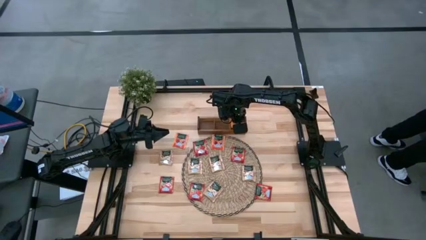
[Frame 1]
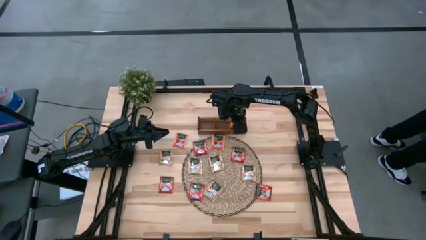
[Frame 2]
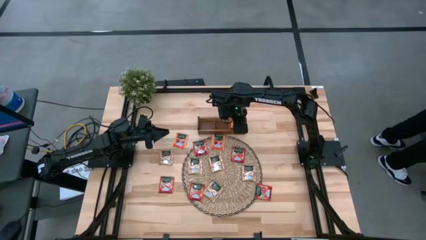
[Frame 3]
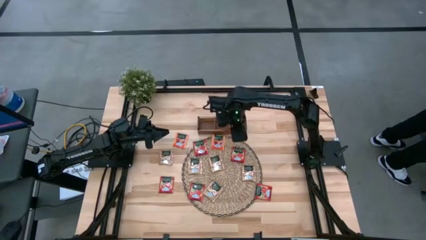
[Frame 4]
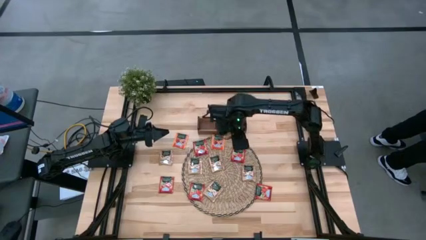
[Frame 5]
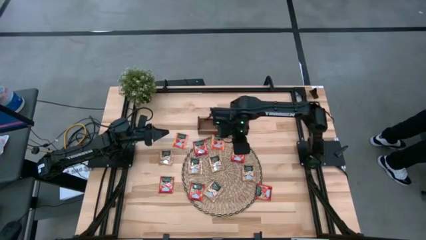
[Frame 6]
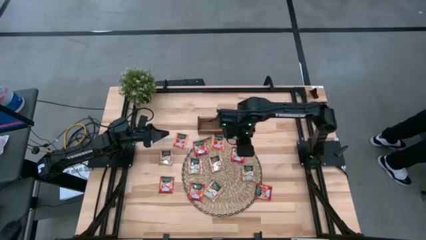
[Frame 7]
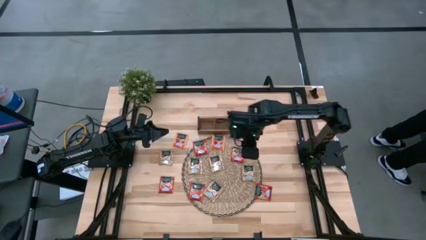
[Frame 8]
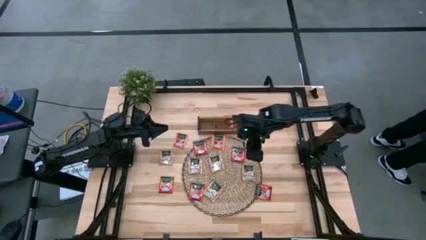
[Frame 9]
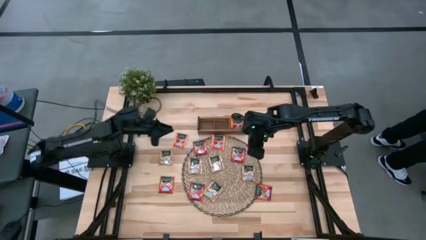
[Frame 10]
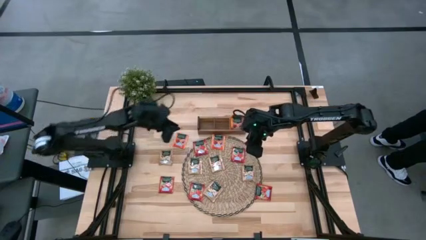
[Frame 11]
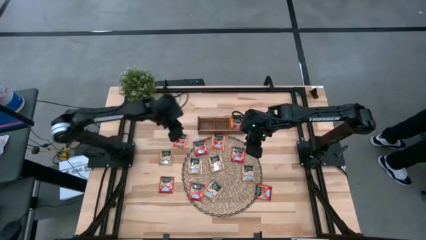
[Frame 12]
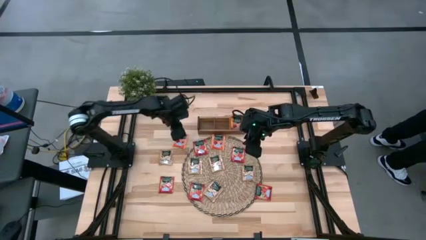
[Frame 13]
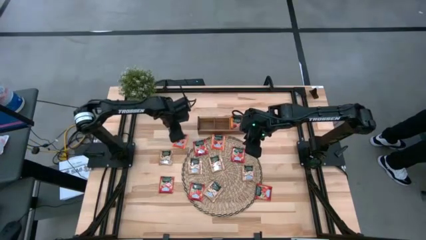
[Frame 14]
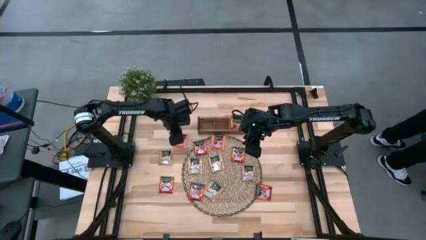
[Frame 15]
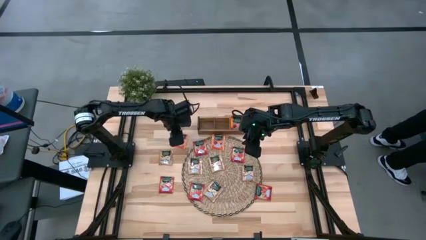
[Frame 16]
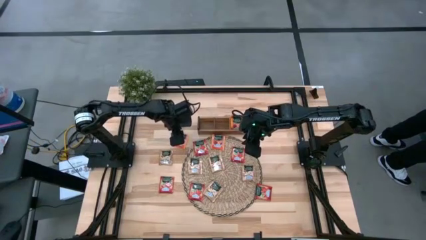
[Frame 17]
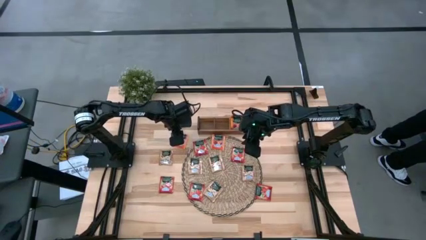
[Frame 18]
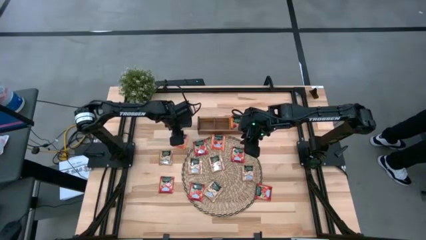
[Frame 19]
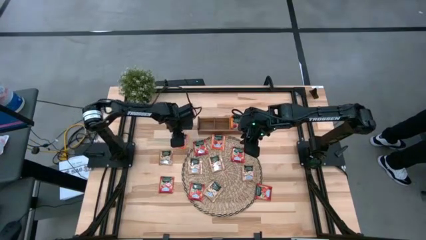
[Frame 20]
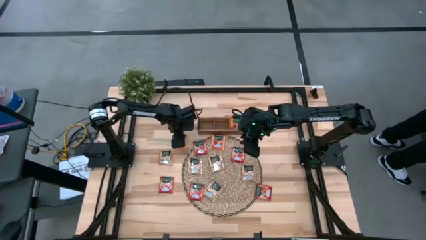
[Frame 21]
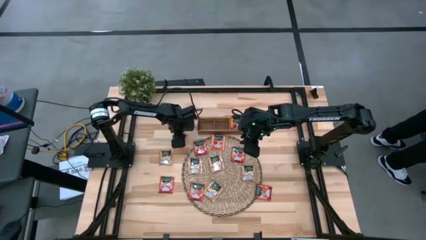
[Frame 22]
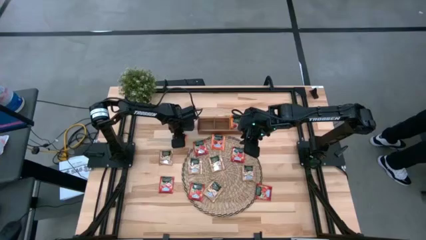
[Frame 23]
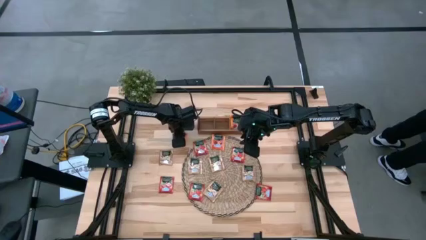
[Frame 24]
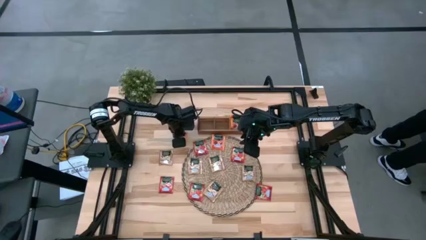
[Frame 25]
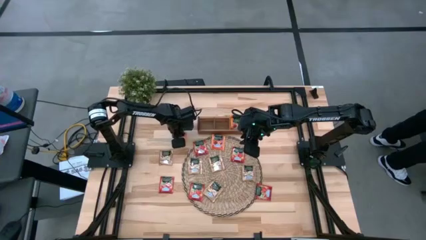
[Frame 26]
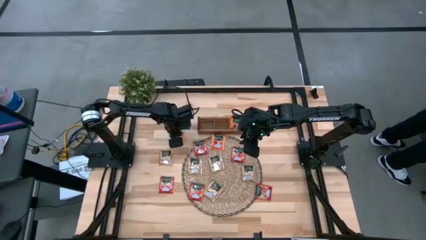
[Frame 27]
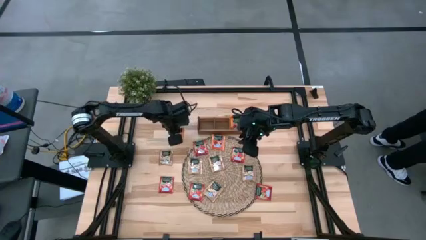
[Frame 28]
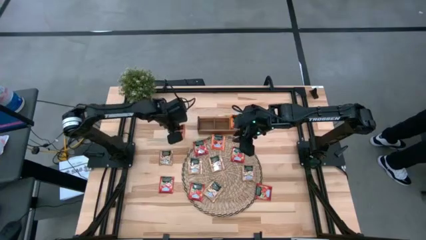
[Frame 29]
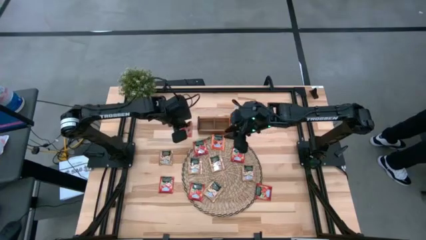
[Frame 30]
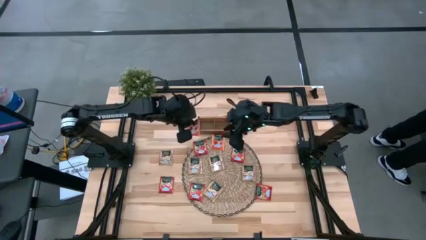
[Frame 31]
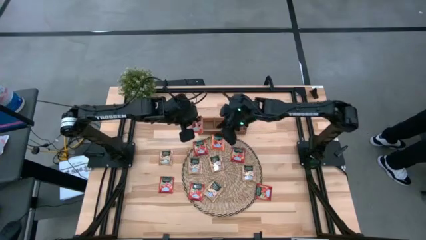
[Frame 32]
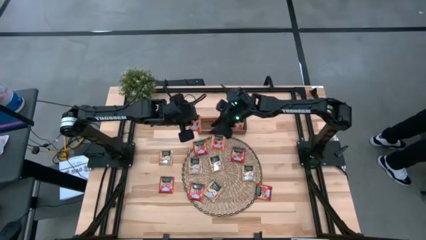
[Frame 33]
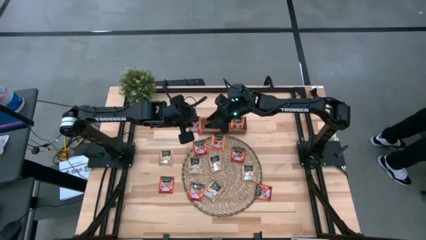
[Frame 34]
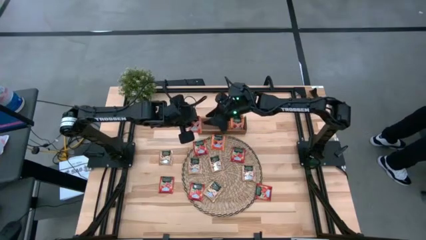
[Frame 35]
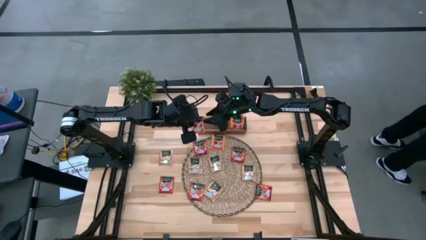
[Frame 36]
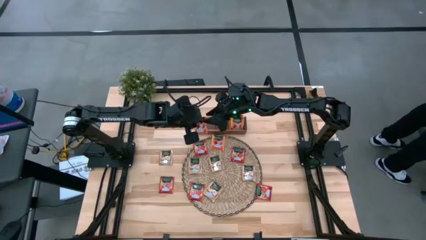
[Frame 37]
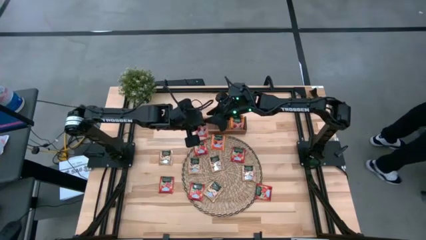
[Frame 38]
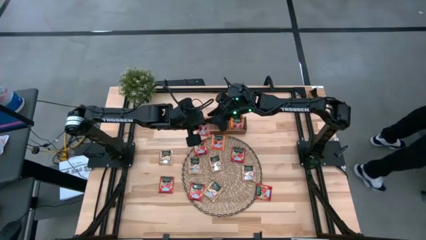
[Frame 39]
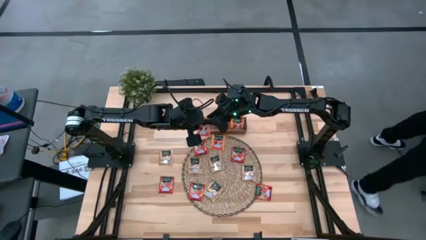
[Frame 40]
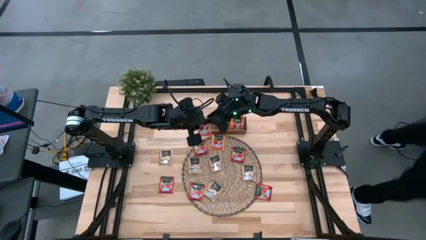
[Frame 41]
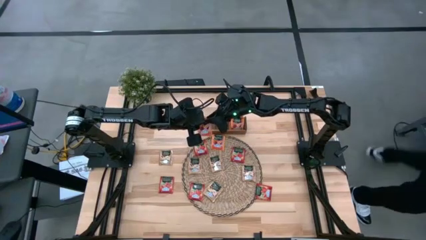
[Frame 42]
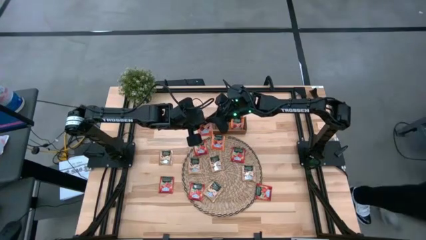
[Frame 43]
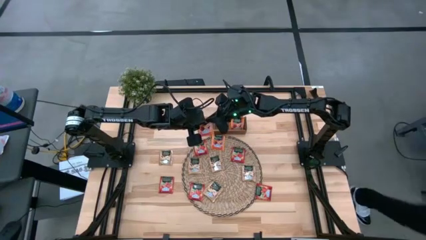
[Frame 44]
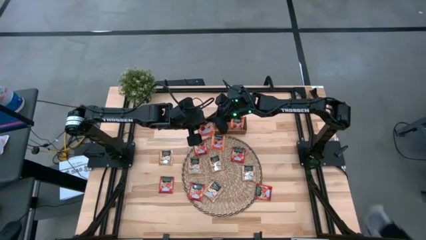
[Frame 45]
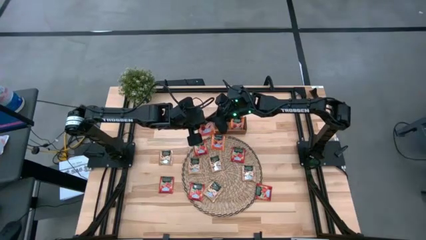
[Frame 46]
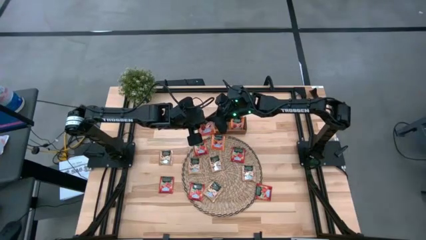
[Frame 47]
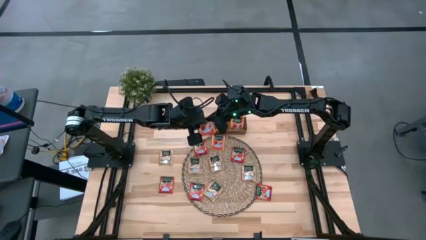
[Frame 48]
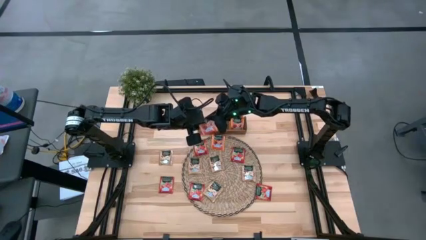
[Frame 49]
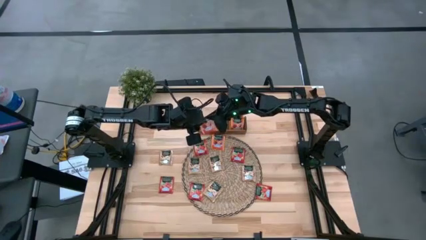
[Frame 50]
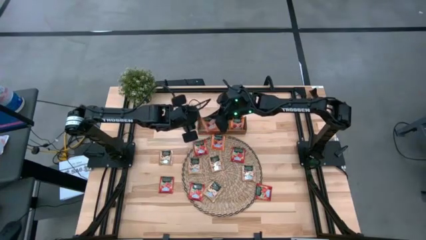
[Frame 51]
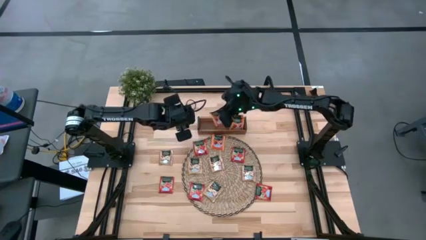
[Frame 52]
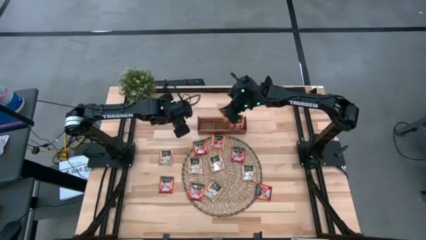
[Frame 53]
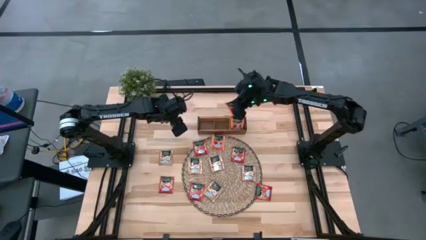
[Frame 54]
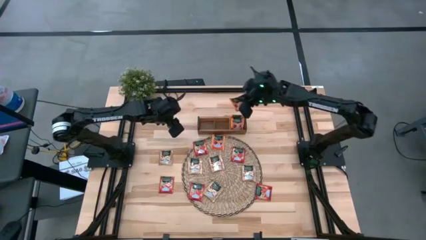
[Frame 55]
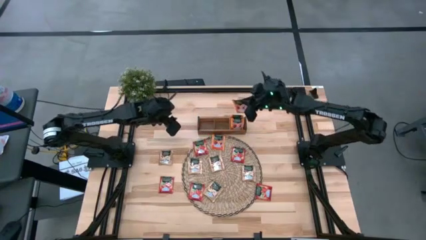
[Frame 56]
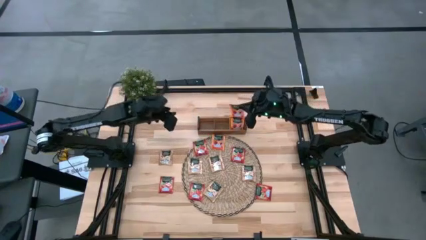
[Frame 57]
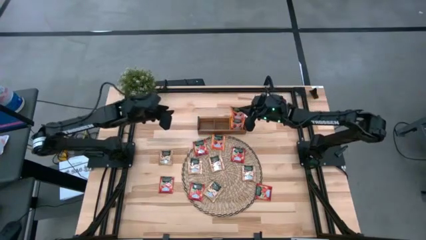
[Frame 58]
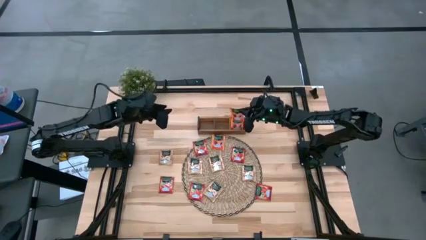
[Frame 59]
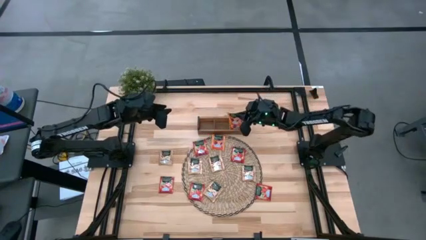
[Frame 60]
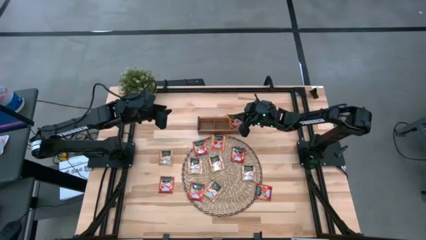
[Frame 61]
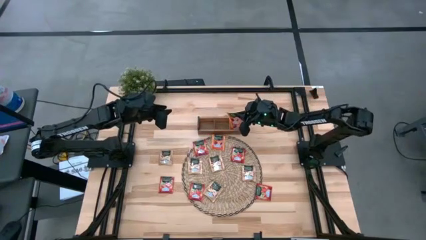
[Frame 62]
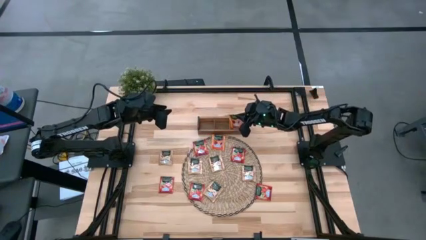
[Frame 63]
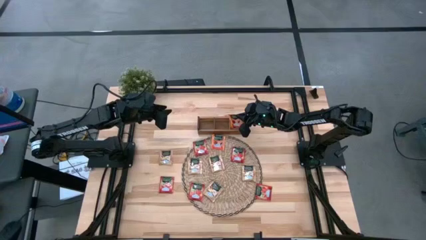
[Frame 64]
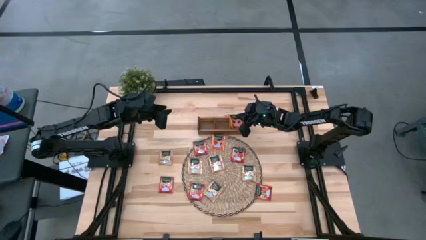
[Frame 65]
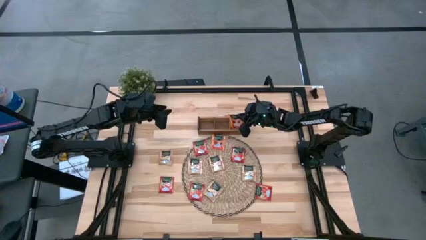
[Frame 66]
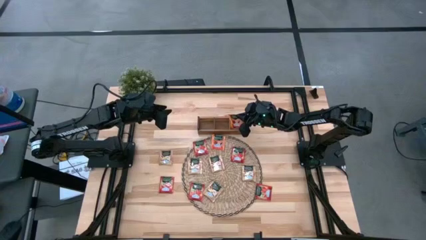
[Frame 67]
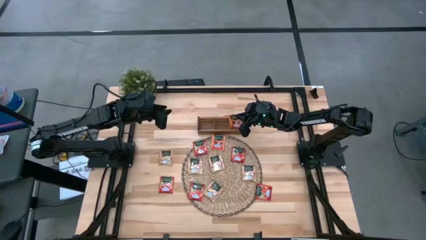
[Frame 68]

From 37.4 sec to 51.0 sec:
Task: Pick & Place Tea
Put the orange tea bag to the right of the wooden organizer

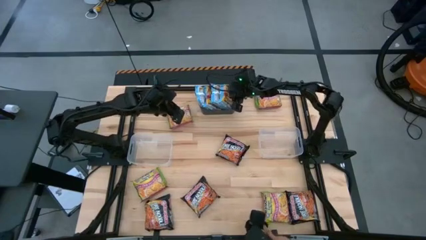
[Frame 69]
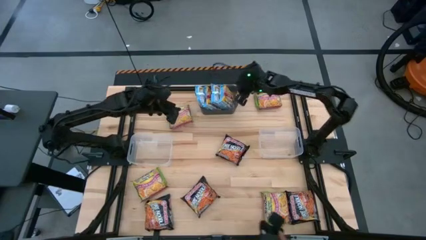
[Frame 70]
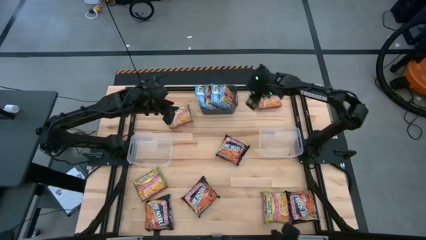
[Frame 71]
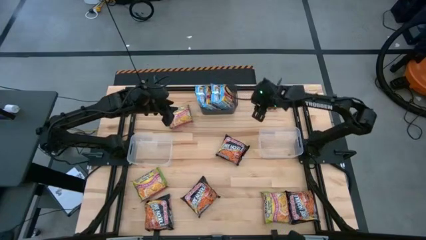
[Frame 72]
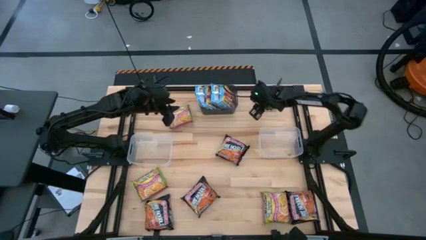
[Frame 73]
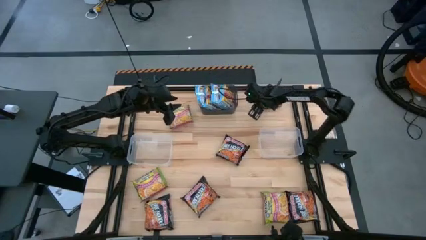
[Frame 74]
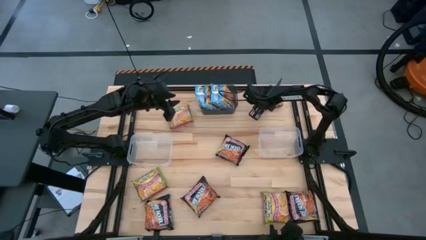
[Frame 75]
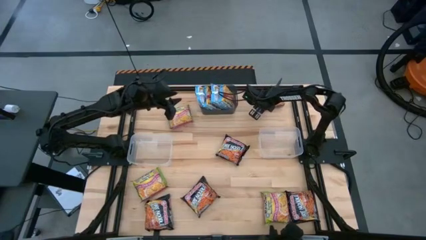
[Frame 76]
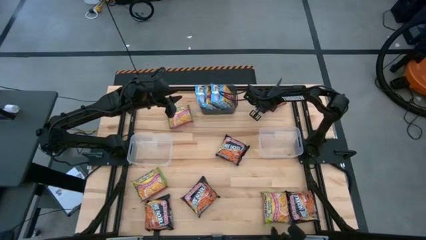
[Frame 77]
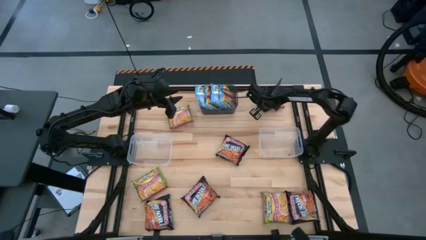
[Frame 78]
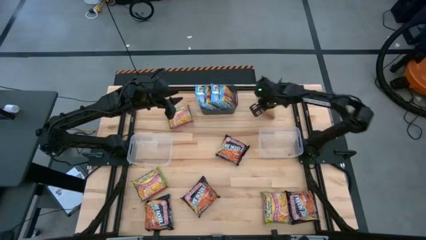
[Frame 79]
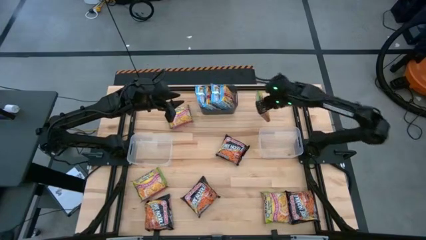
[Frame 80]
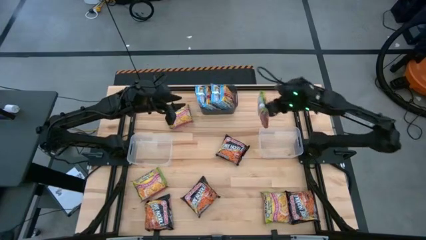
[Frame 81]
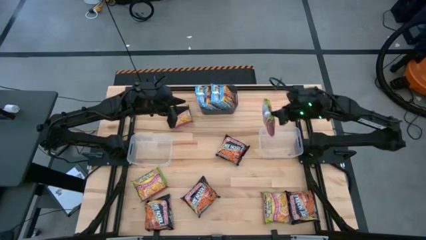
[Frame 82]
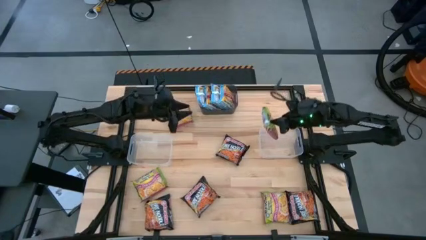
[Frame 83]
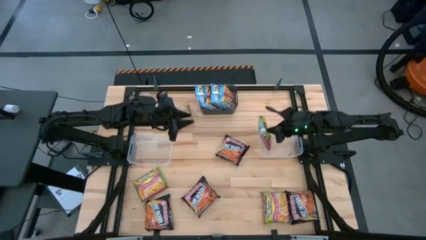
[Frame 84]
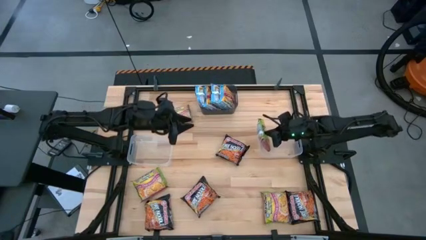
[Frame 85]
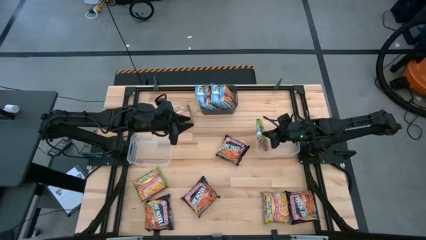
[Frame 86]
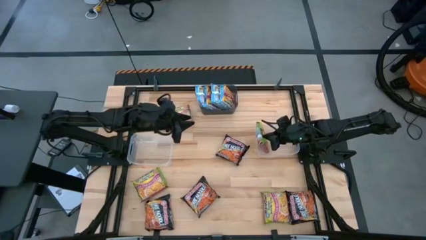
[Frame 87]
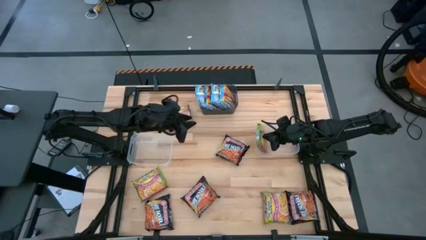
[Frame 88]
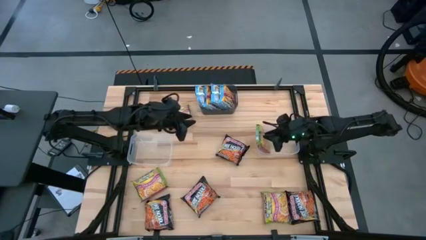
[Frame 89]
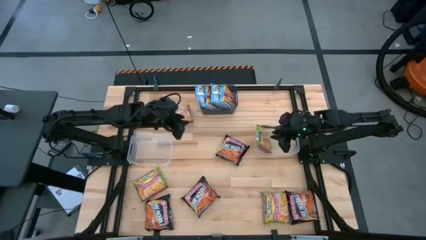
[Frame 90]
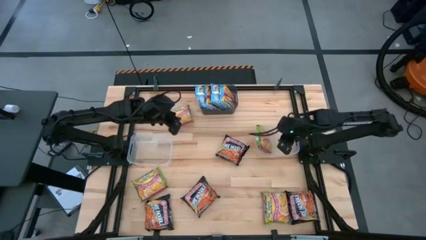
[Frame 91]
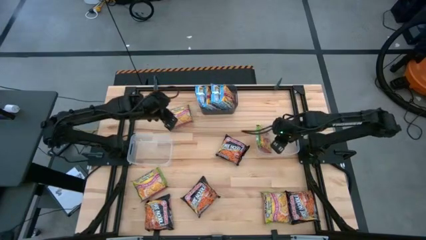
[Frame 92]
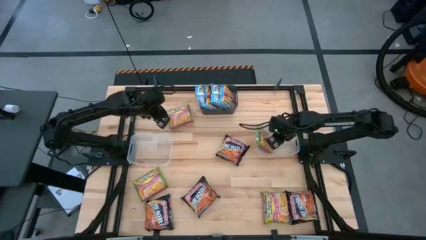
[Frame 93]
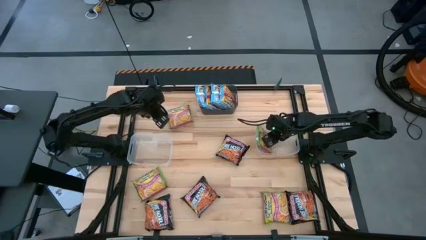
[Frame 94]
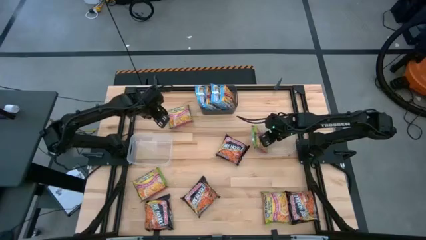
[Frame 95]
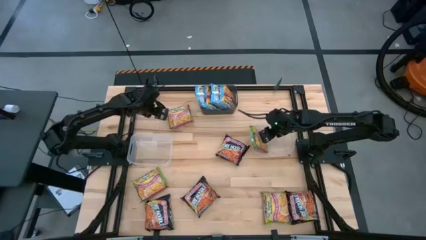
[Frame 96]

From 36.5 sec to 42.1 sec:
Task: Sort Maruchan noodles
Put the green noodle pack into the right transparent bin
